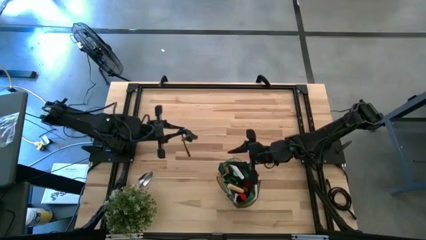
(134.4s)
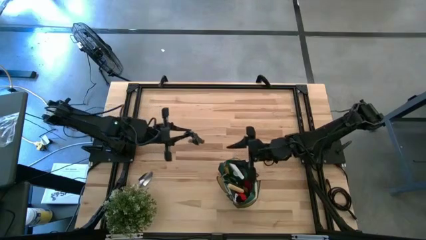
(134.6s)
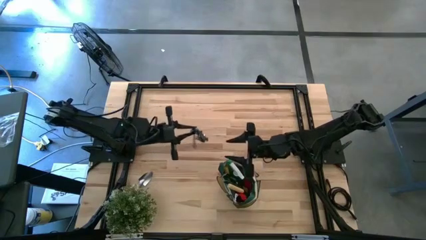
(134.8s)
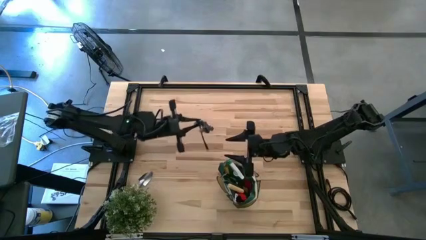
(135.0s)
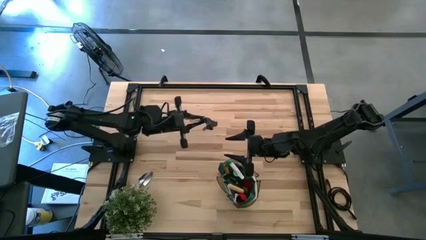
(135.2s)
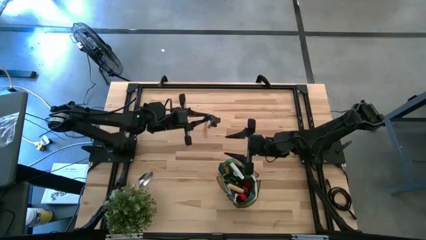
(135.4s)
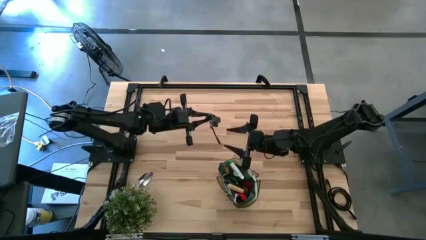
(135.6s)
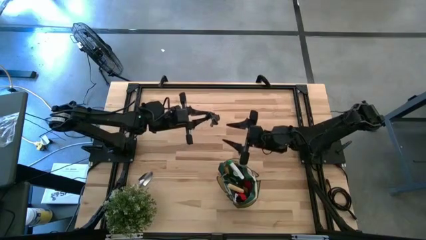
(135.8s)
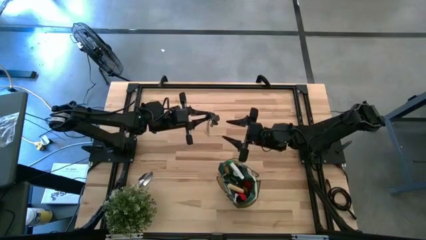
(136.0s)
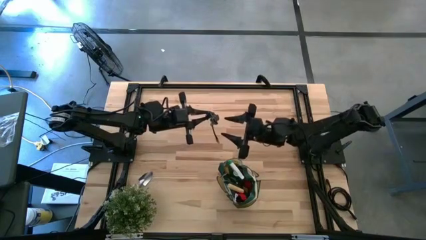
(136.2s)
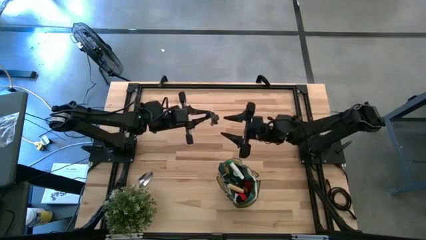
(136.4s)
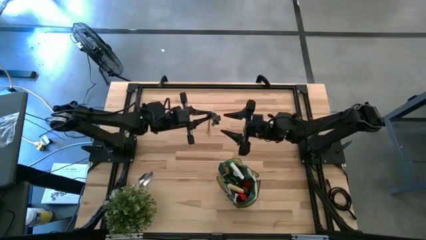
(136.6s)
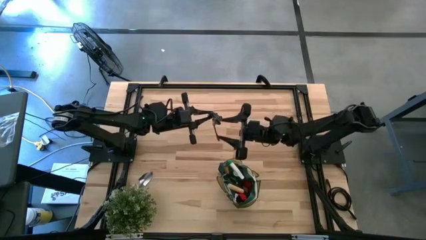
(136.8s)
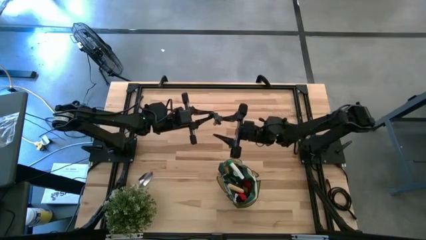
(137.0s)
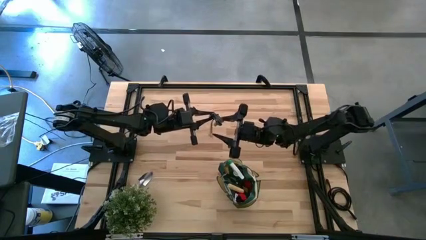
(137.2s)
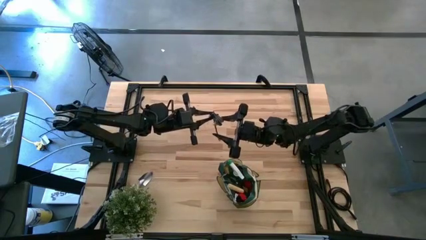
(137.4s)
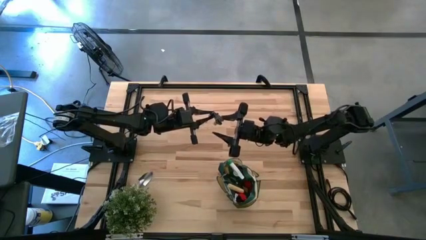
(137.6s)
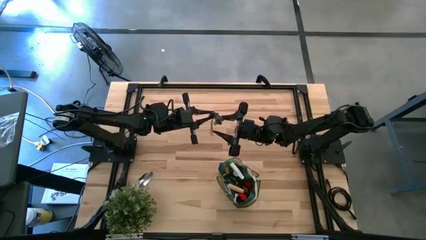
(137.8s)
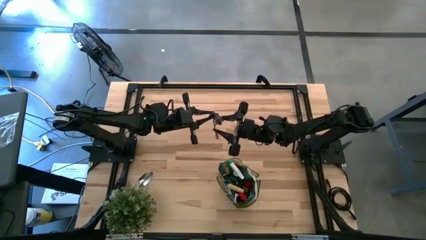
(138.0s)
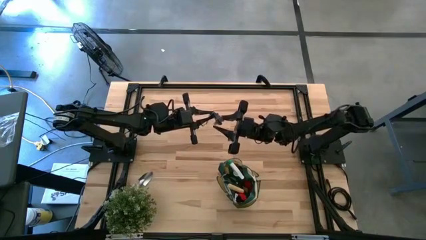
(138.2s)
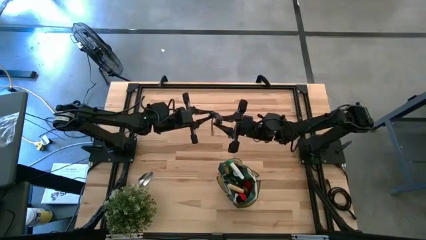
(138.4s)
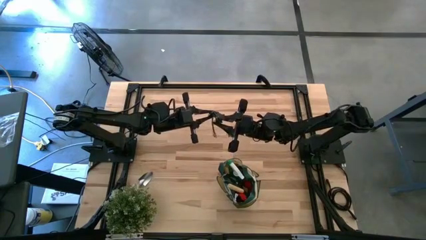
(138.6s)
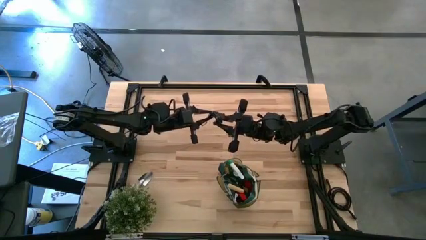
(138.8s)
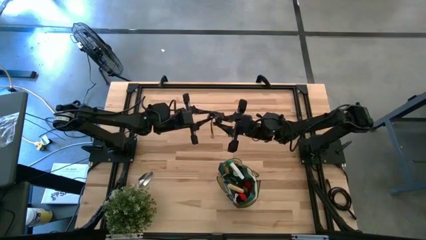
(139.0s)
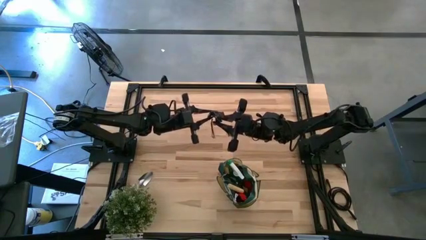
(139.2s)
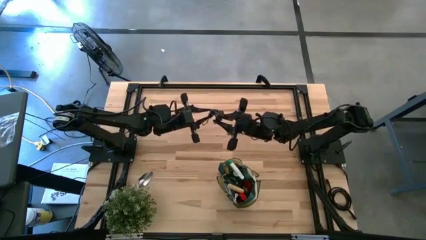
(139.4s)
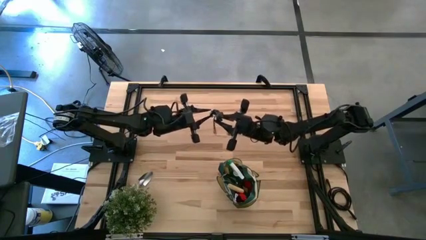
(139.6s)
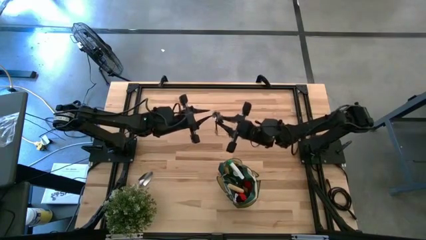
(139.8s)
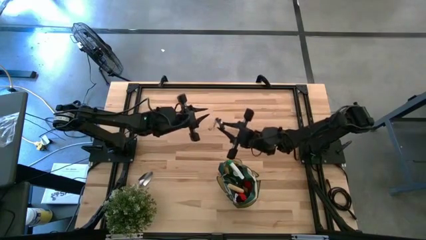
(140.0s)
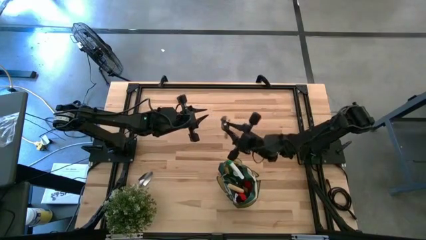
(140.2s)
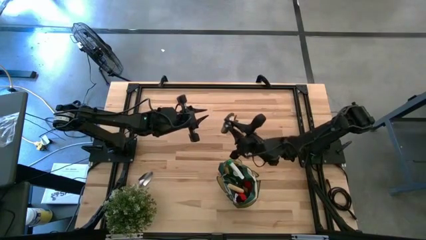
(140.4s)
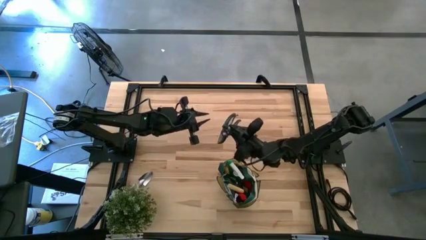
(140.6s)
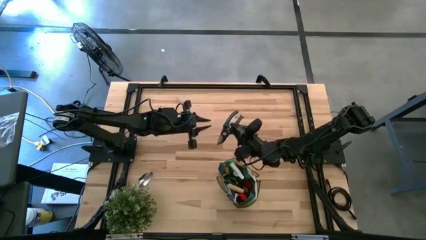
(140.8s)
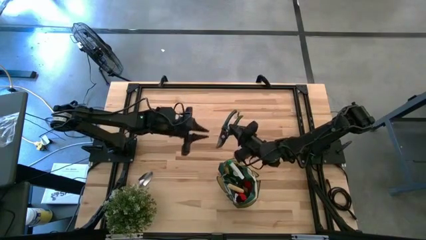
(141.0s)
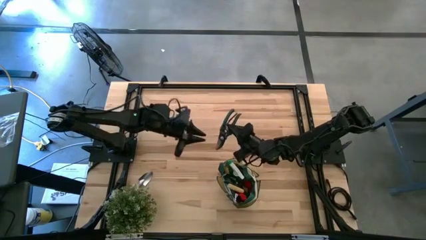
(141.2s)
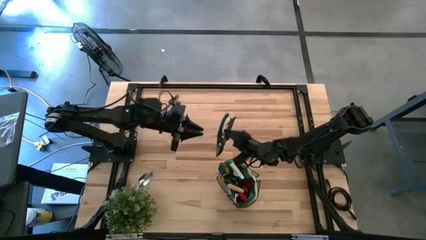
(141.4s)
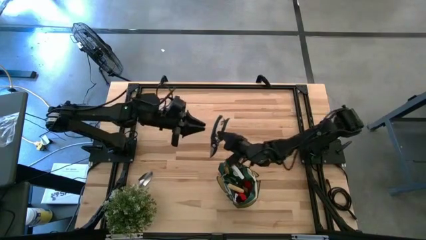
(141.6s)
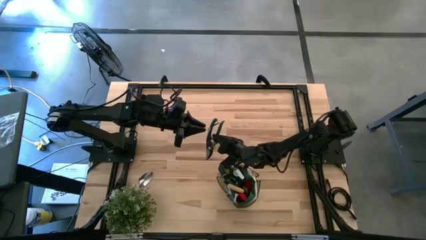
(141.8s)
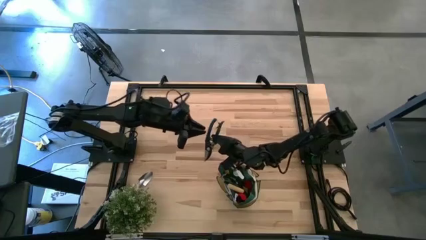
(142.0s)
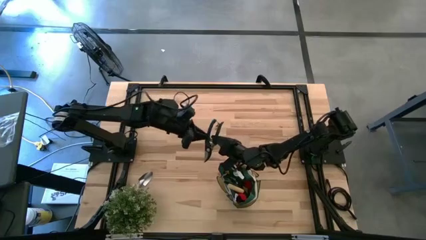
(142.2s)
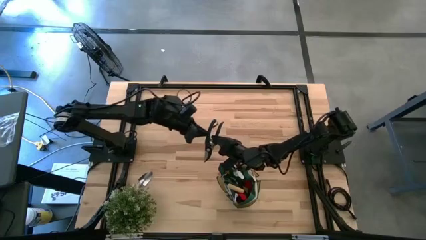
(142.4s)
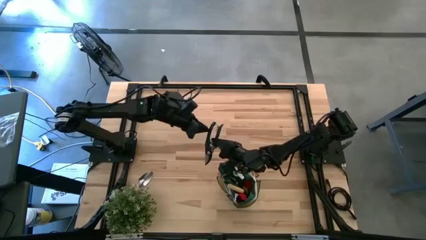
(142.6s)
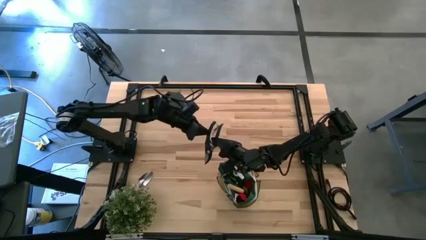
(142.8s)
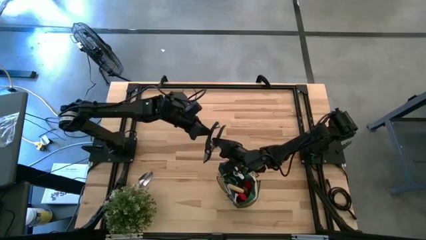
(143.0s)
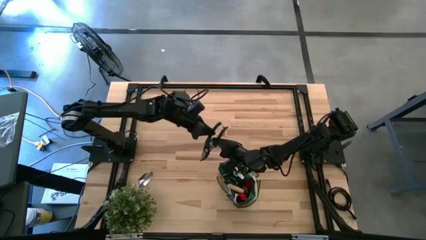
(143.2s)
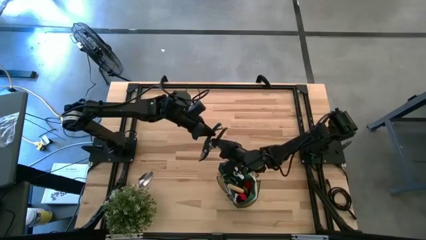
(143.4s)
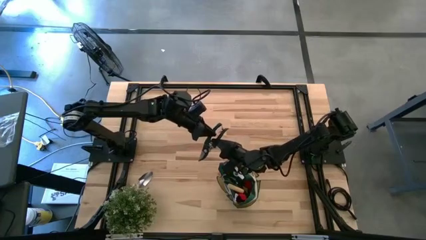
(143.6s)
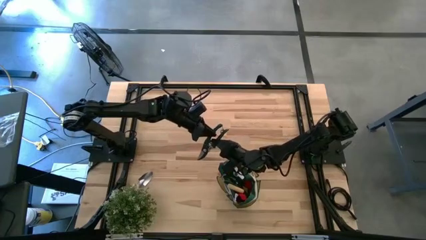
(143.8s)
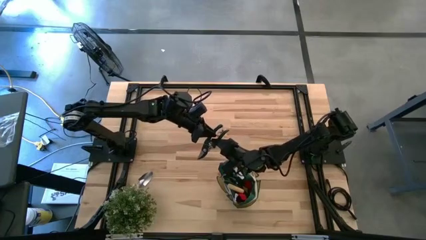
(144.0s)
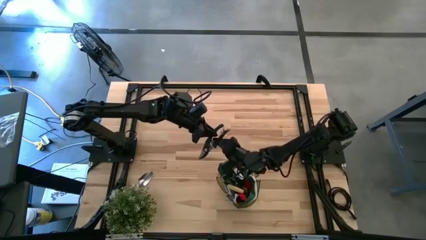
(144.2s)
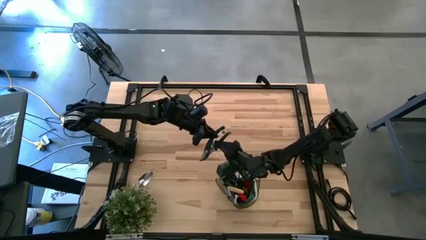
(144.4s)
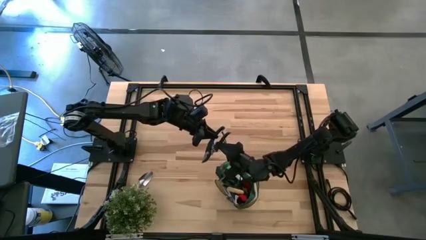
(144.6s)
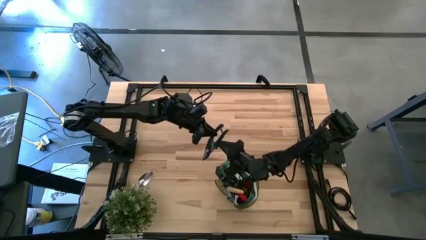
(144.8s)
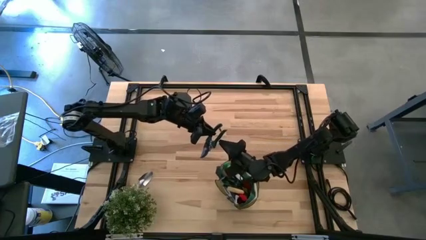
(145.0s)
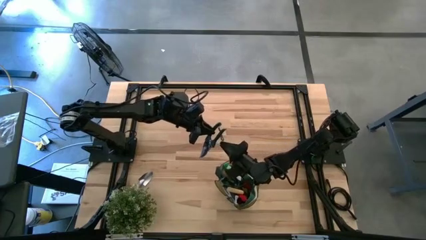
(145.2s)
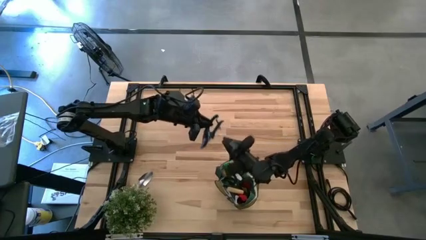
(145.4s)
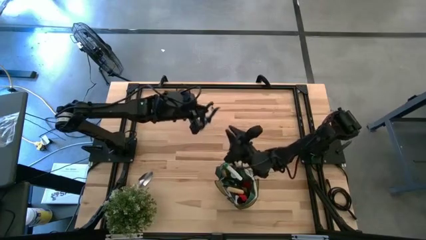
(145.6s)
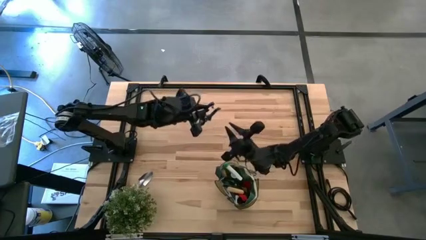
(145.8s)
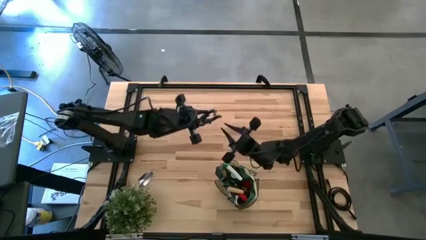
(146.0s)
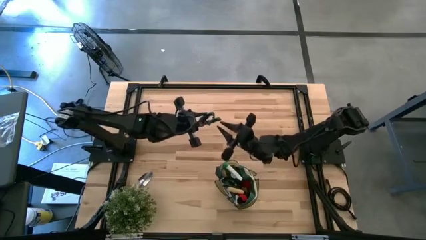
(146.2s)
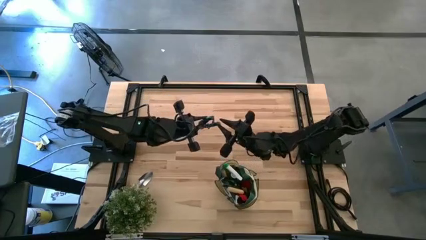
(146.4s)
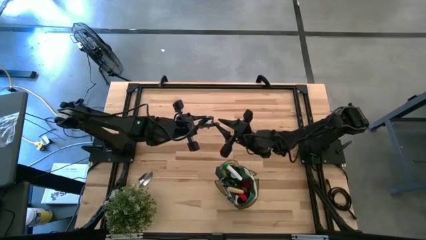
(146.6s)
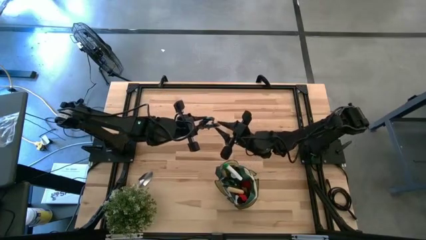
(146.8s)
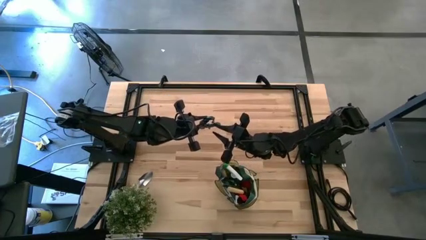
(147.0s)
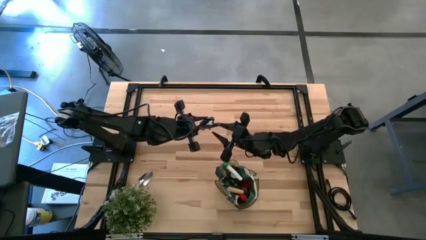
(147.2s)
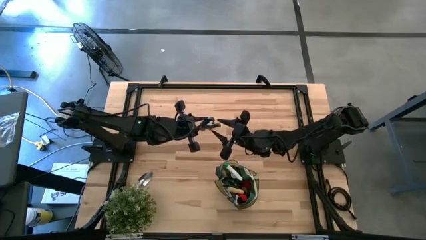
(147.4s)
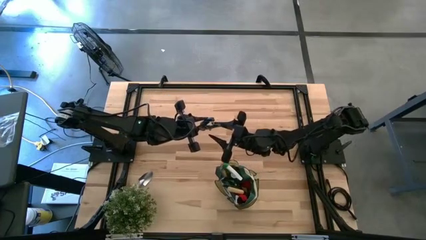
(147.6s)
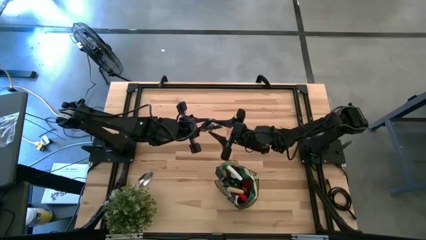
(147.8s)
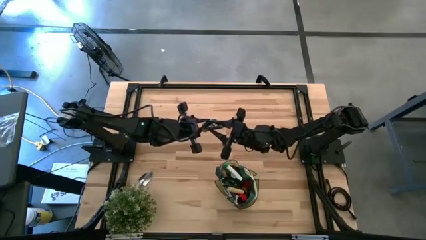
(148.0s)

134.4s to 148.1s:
Task: Pick & Place Garden tools in Gardening bag
Put the green shear scissors into the green gardening bag

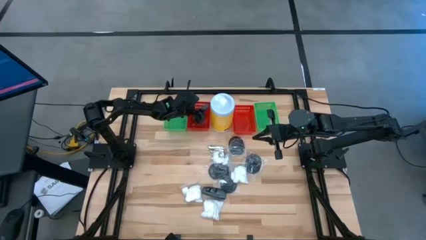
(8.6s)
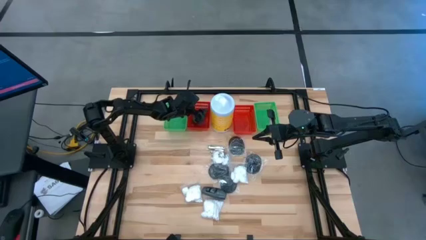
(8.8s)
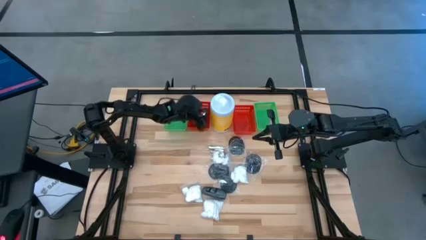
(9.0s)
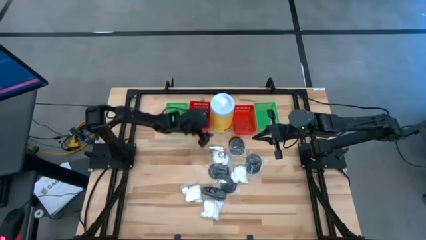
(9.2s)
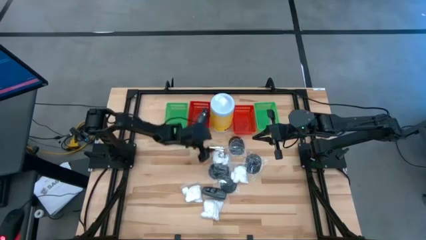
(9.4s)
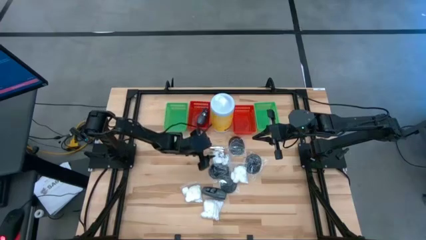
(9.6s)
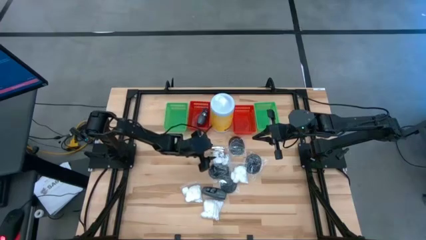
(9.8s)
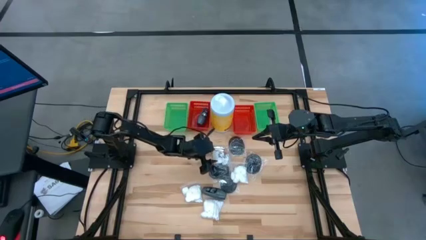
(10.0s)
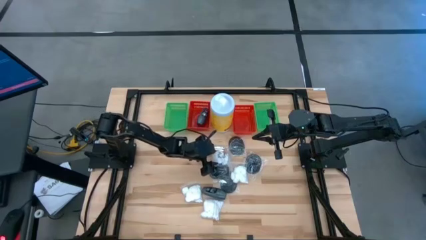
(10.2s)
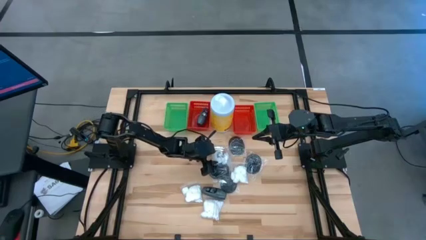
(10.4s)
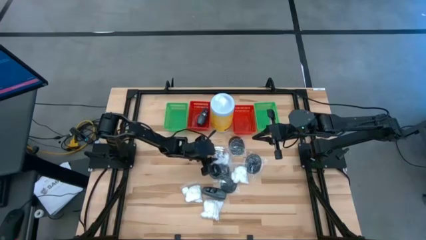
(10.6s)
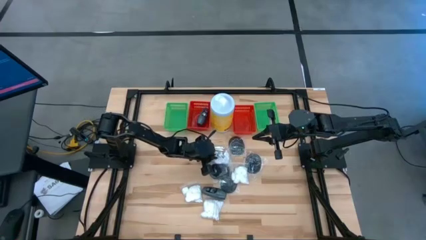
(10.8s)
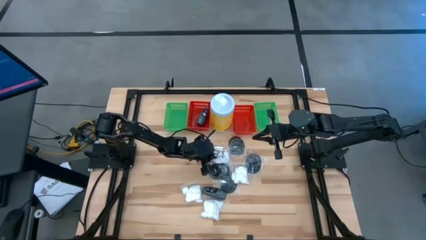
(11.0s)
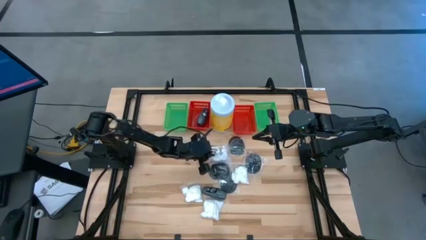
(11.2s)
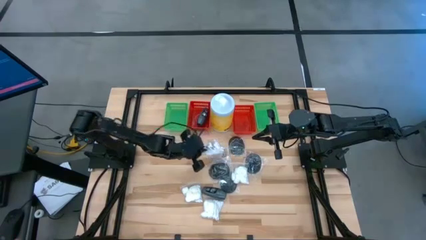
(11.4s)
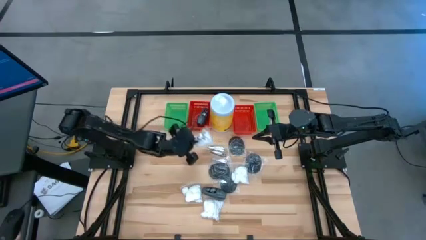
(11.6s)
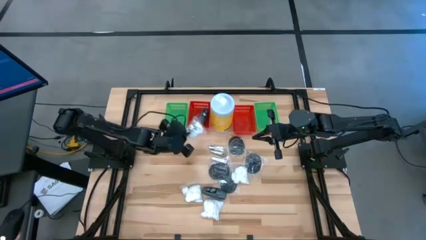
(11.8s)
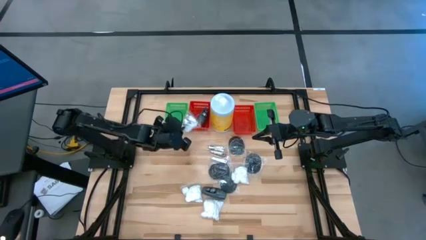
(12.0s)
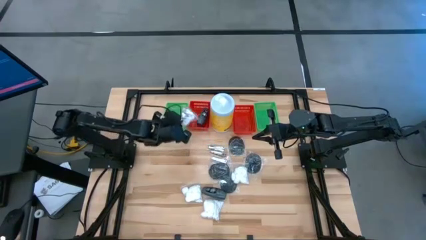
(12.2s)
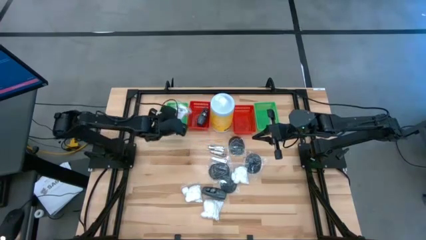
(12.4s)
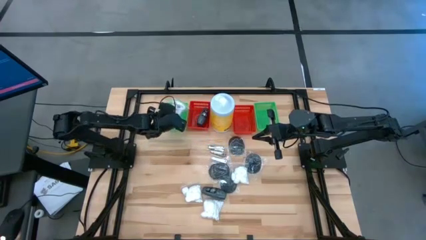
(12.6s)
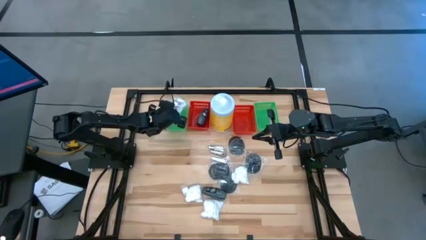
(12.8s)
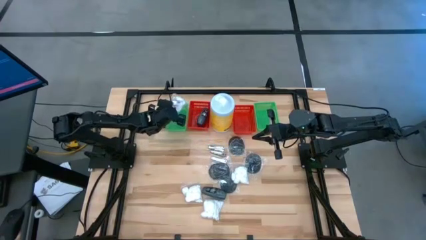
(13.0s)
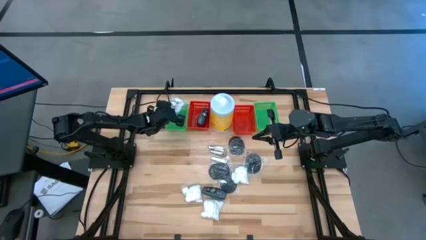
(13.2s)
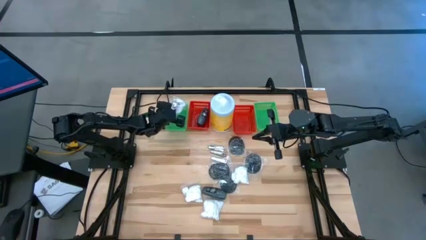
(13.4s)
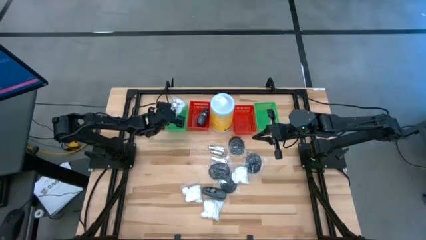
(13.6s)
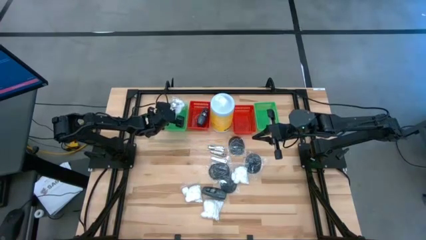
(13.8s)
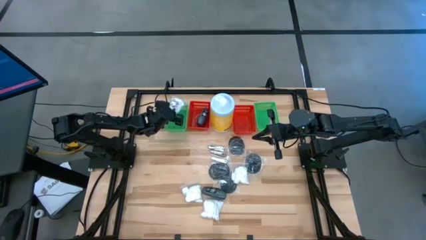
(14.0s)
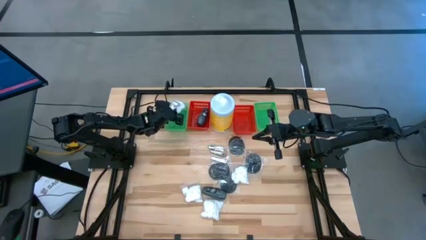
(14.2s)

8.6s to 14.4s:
Task: Pick & Place Travel size toiletries
Put the white cotton pack into the left green bin
